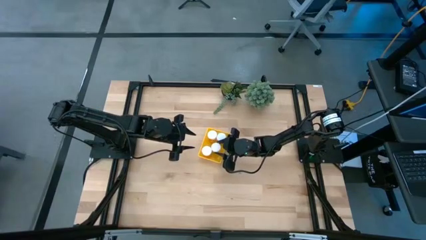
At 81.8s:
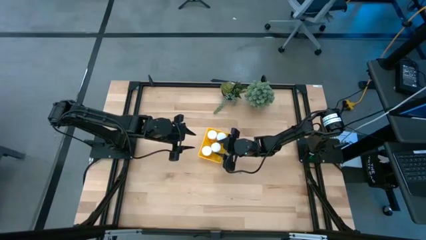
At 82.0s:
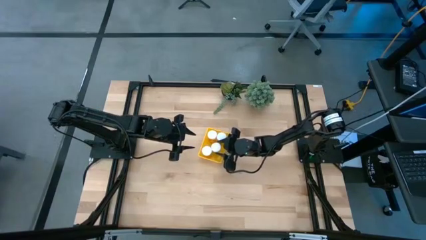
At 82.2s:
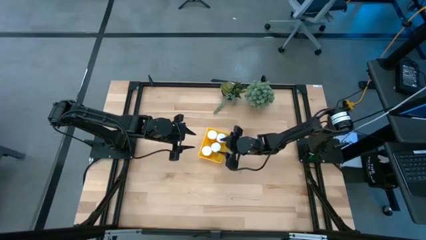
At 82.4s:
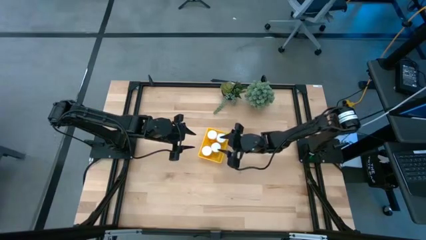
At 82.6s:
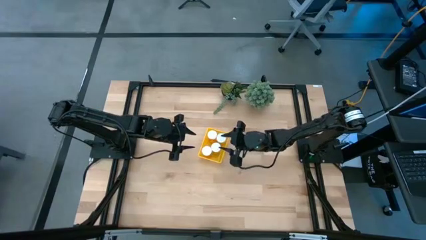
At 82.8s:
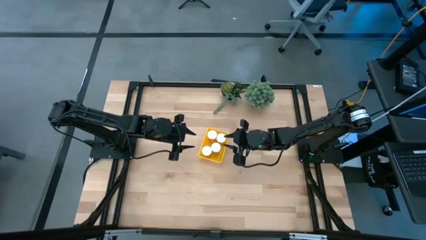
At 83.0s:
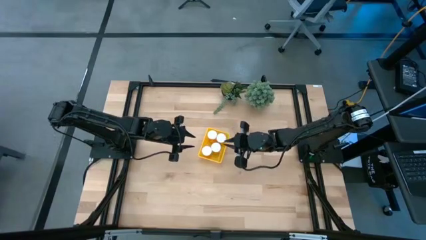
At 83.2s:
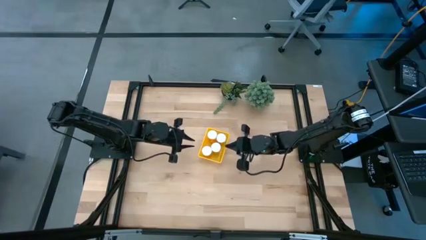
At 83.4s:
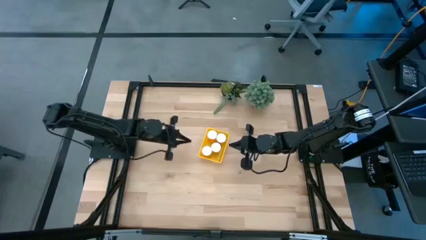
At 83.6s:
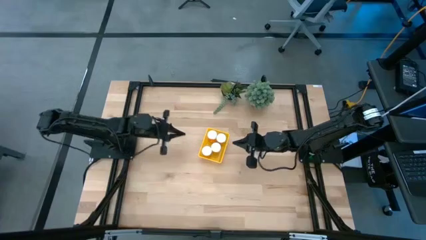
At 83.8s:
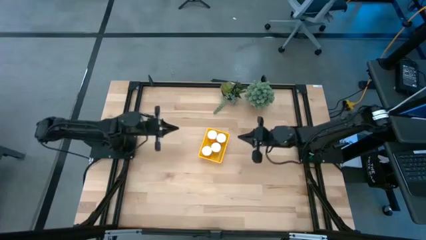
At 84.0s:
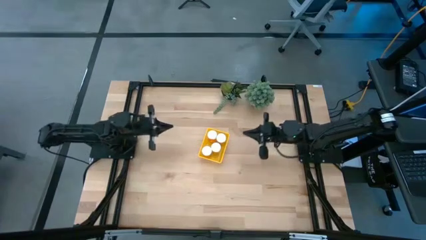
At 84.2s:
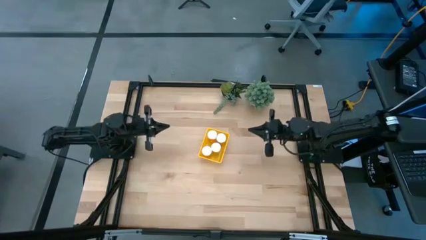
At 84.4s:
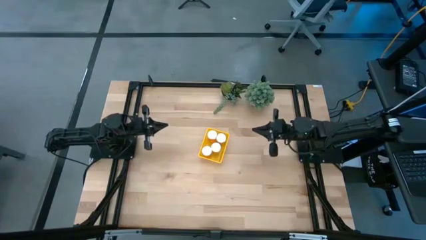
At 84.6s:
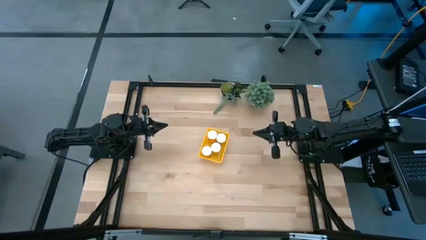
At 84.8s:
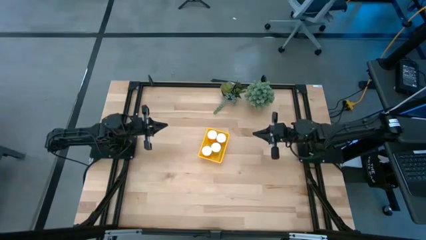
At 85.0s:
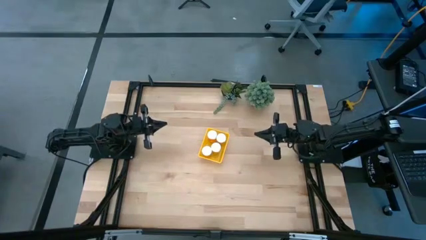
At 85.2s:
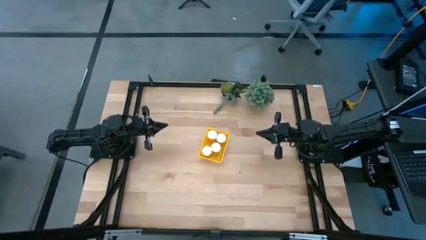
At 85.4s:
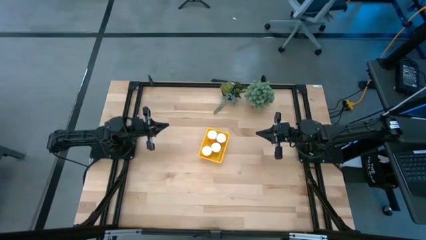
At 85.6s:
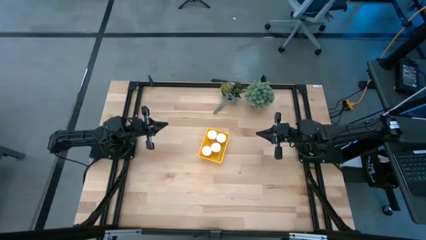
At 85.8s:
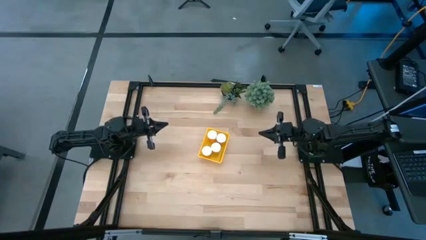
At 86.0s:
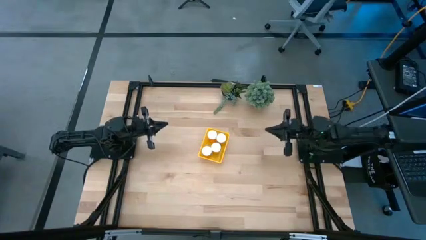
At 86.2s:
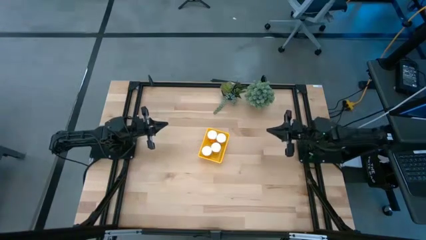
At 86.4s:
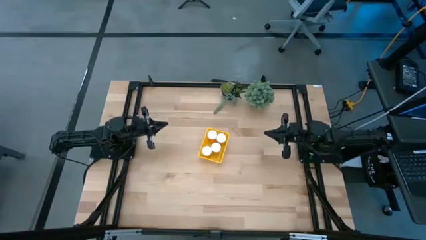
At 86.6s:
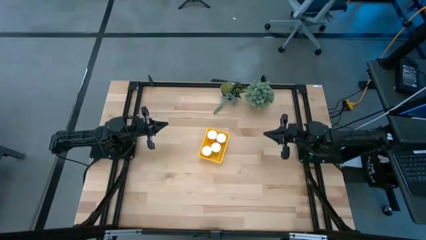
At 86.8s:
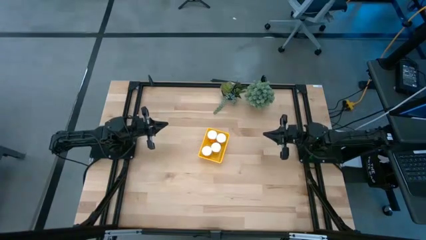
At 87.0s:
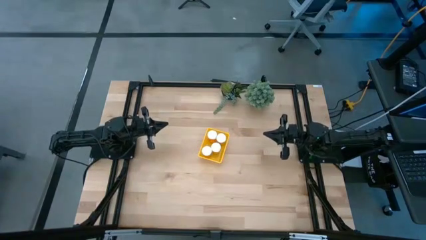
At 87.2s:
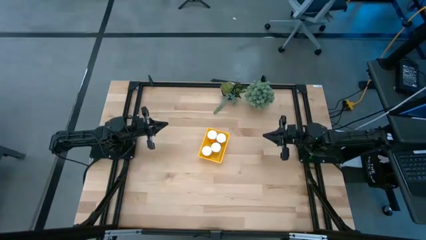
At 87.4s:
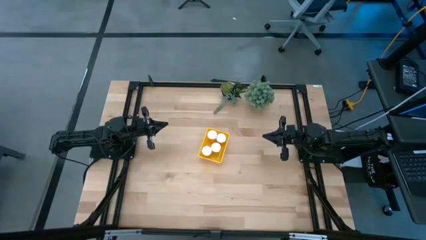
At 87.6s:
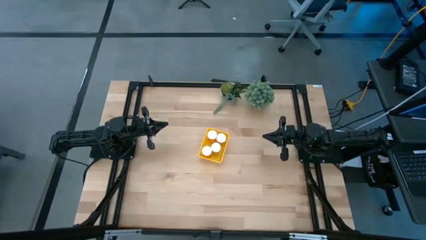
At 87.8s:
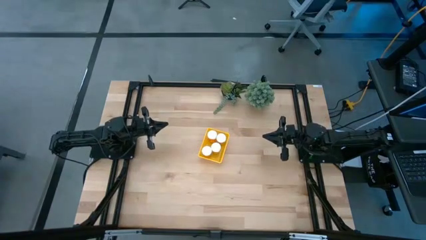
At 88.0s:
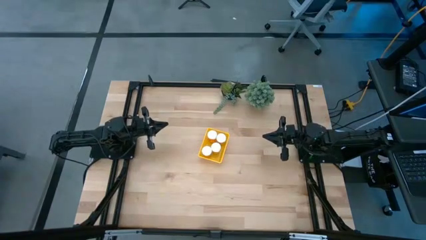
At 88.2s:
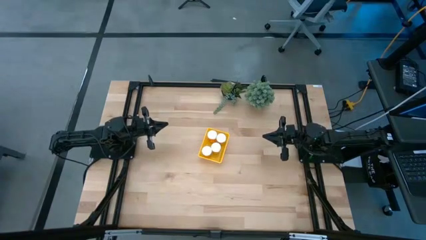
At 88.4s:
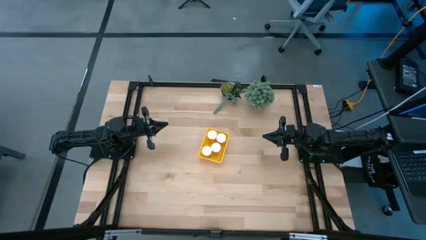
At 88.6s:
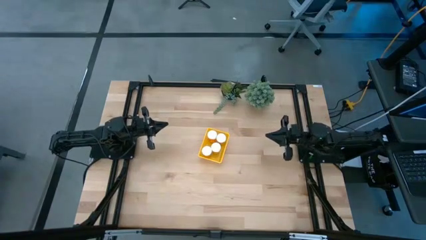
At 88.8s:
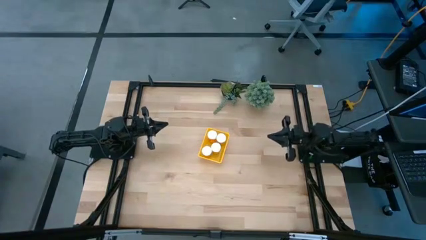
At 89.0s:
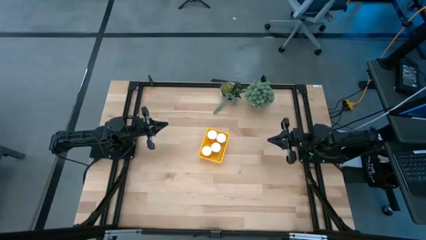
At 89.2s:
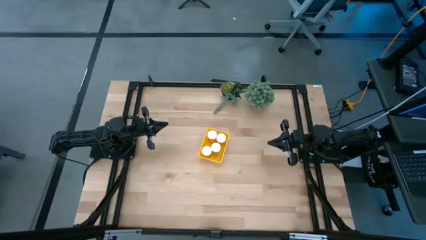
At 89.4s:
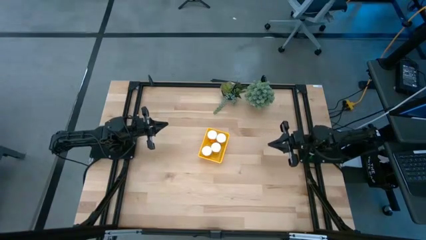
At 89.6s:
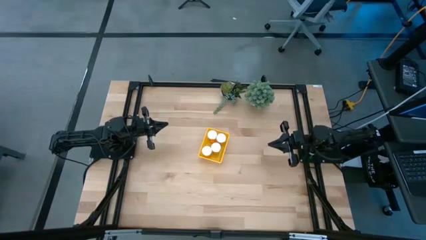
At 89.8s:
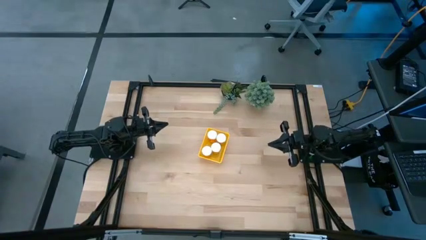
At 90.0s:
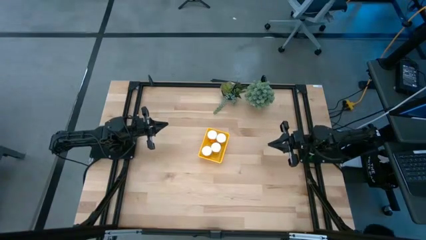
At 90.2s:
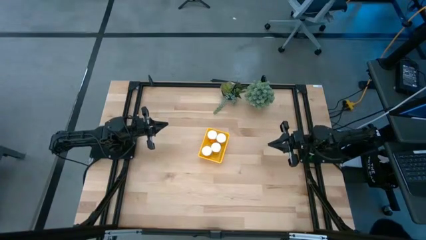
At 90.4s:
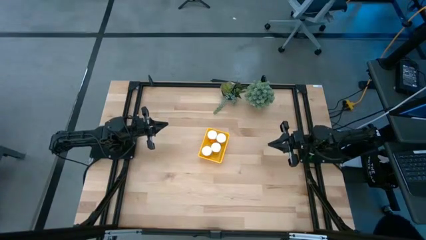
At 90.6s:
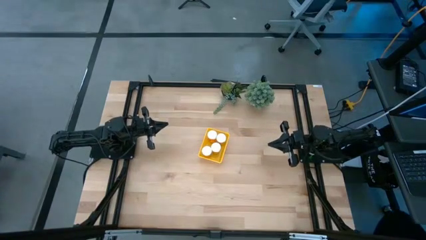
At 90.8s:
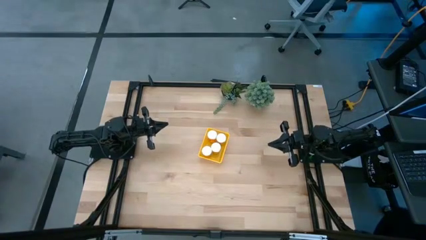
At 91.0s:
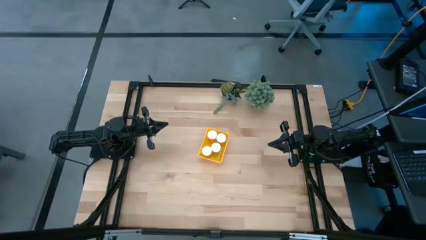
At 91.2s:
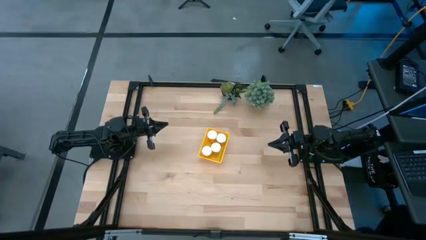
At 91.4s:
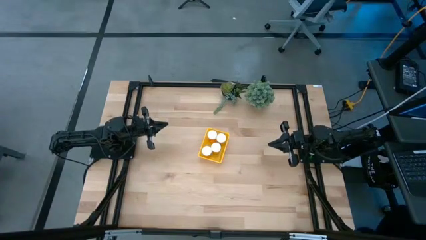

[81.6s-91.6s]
Task: Pick and place pill bottles into a basket
Return to Home Position

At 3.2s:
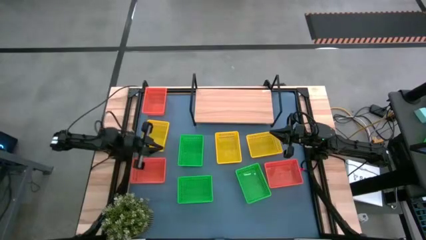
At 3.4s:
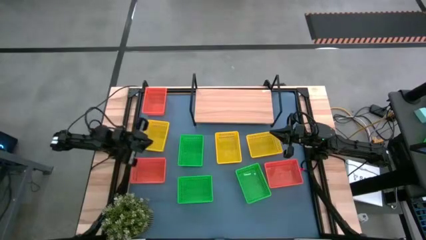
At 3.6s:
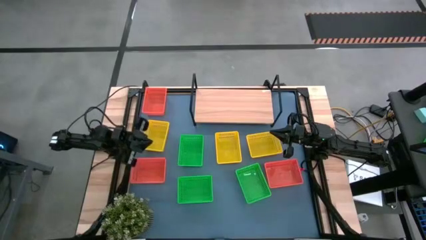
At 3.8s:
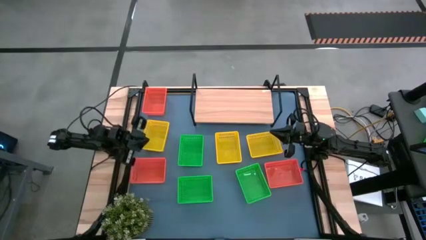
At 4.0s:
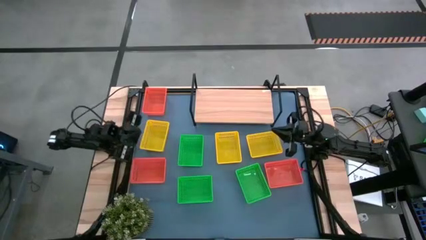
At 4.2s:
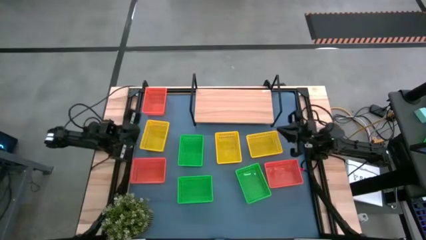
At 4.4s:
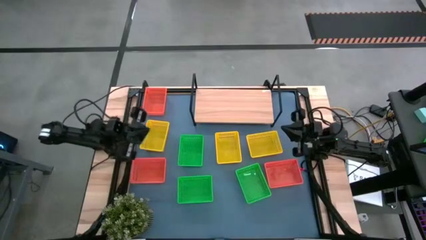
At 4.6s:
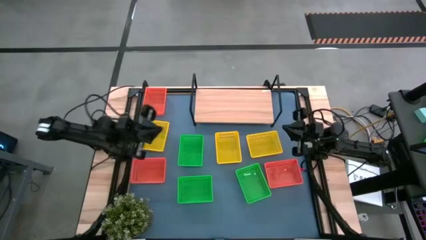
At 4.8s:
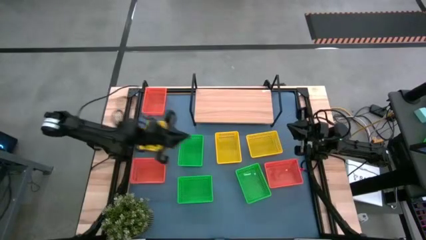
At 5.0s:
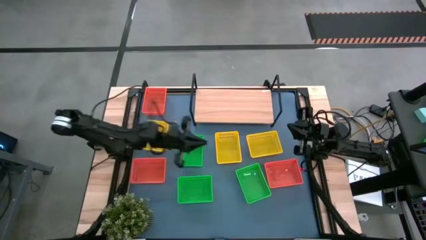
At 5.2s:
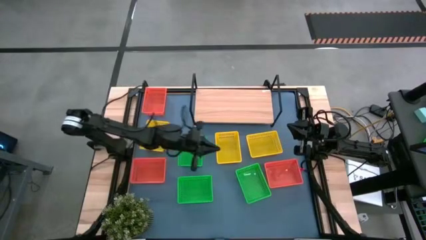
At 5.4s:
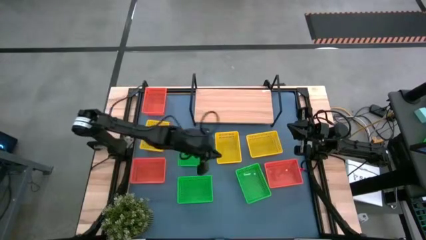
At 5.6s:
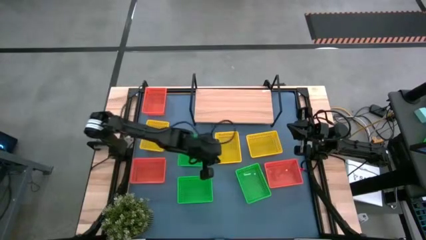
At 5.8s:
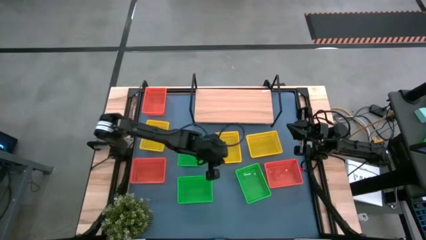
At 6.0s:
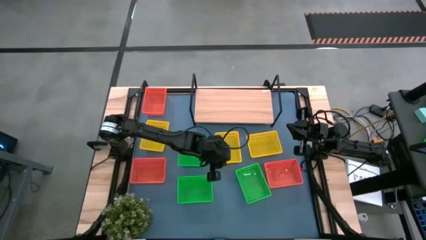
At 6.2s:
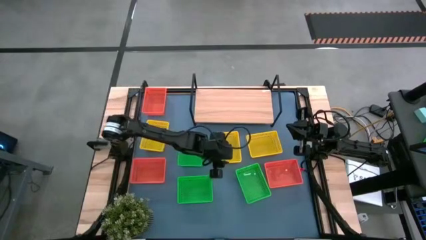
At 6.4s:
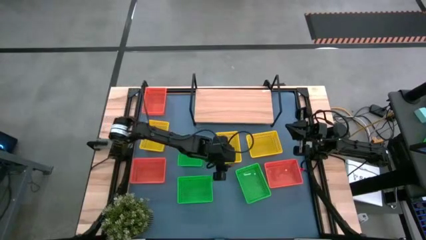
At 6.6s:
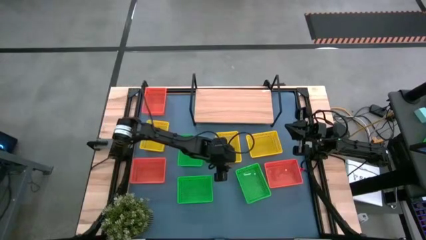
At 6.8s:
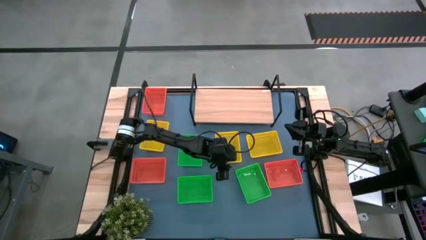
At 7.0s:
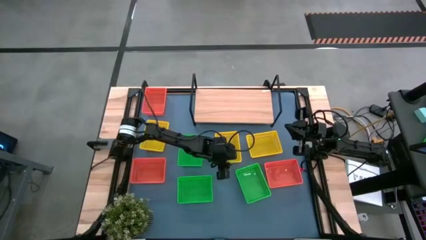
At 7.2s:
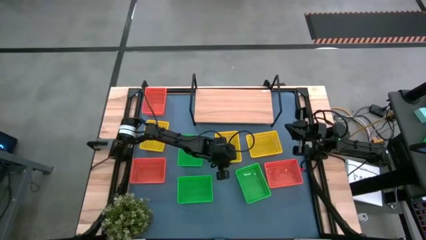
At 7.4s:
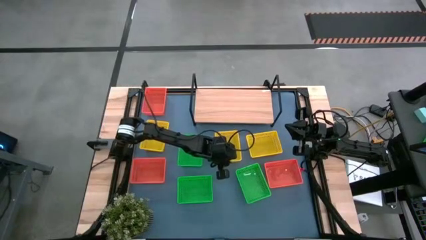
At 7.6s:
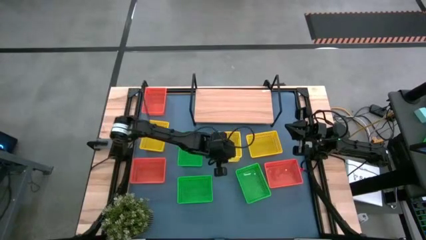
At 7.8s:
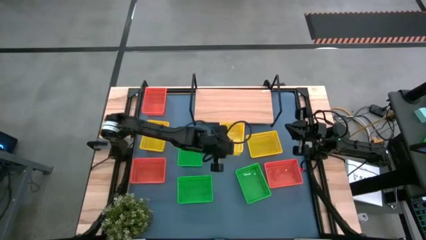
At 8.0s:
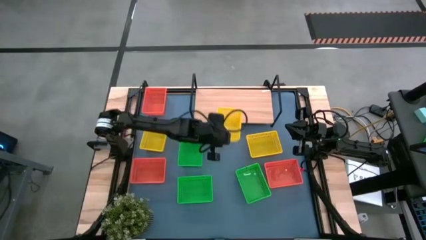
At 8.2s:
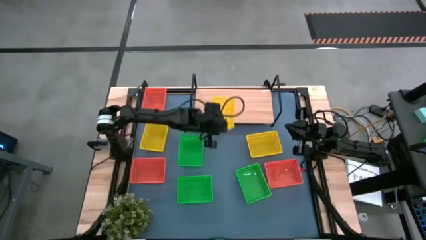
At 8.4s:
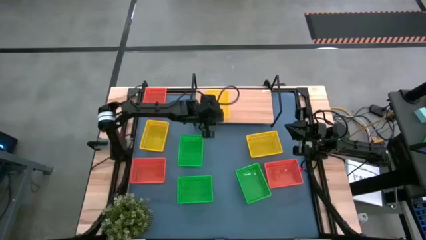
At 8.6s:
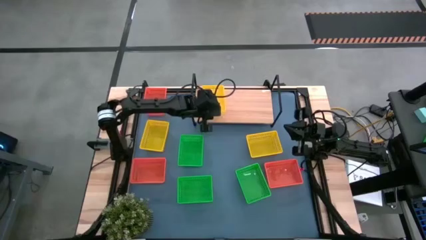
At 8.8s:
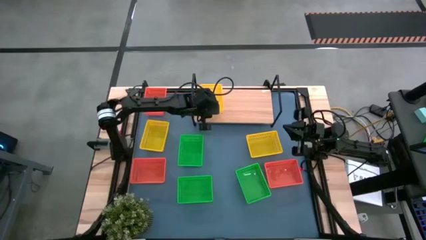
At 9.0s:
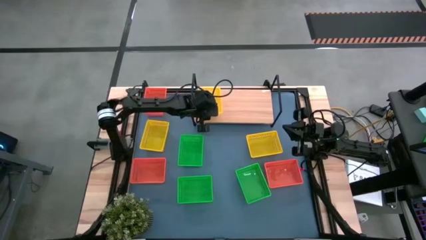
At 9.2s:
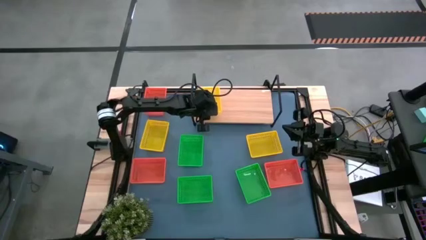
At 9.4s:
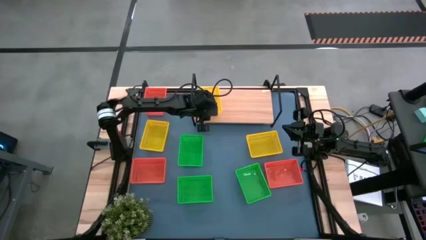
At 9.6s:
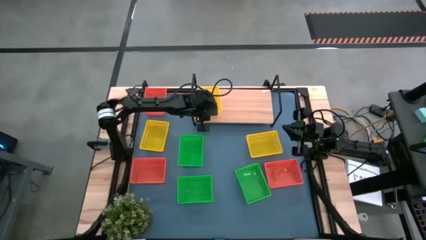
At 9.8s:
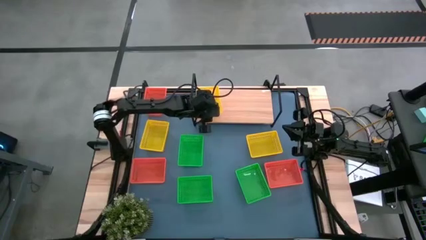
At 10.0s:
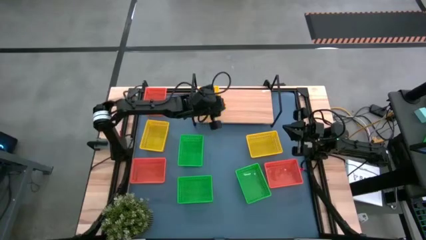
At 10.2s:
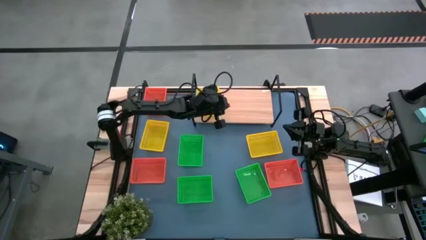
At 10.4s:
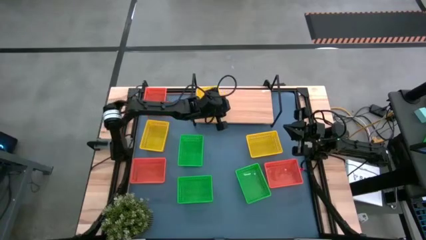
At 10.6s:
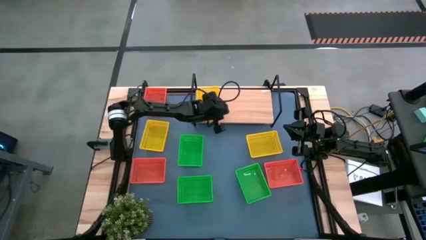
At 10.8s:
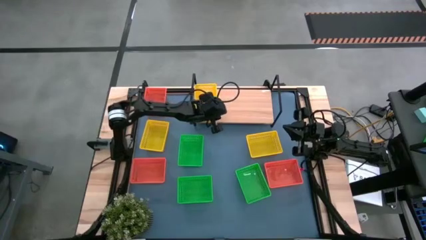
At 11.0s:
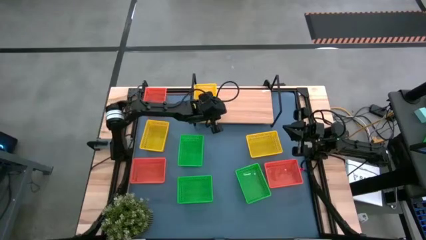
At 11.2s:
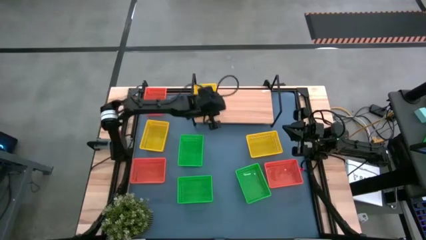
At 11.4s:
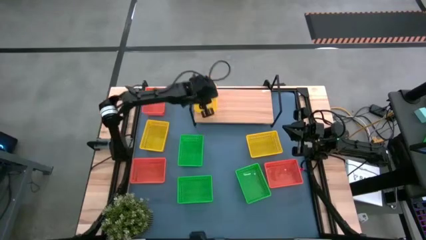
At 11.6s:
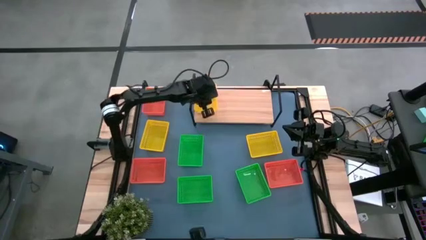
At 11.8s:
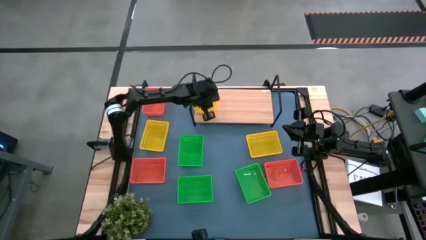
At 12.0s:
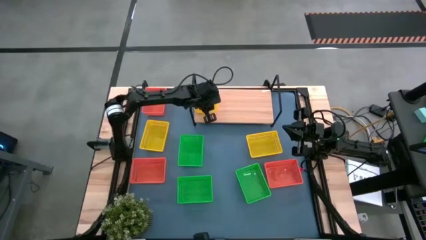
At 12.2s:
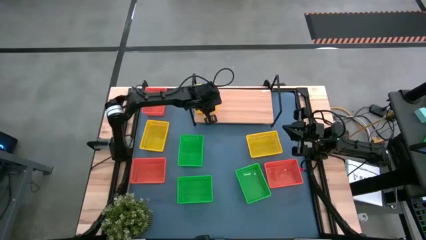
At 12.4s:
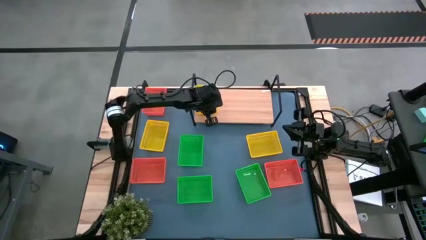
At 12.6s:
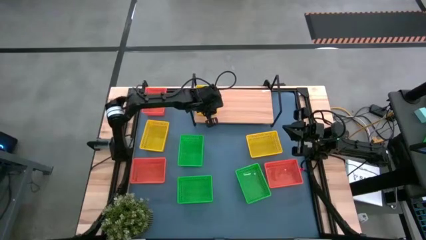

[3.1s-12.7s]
Task: Stack baskets on shelf by color
Put the middle yellow bin on the shelf
